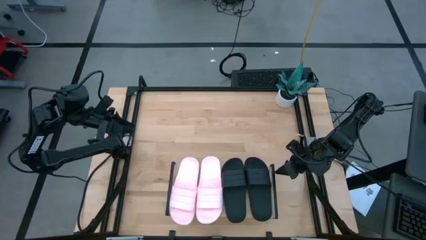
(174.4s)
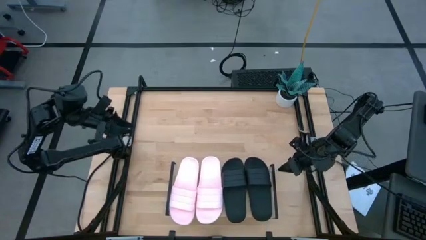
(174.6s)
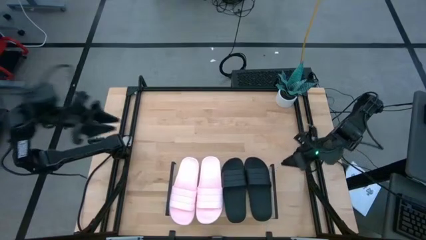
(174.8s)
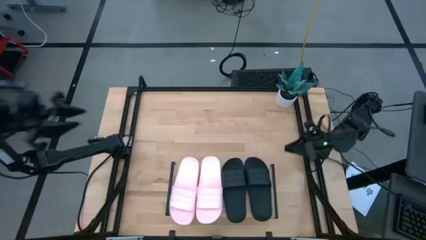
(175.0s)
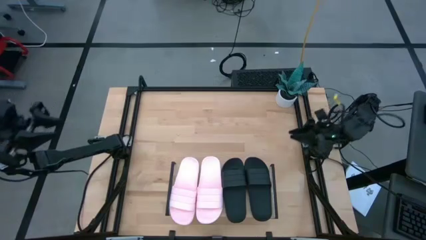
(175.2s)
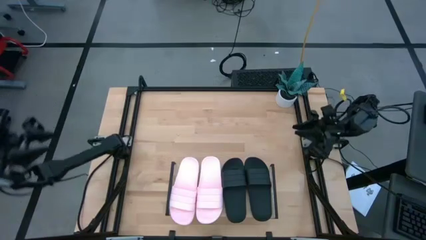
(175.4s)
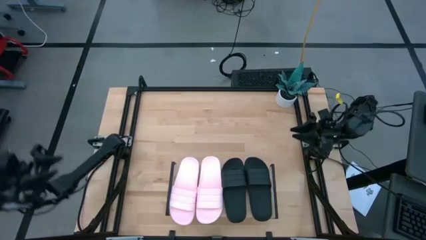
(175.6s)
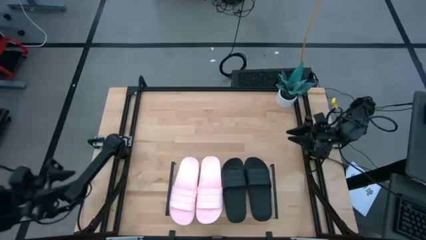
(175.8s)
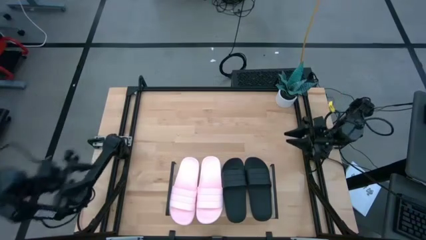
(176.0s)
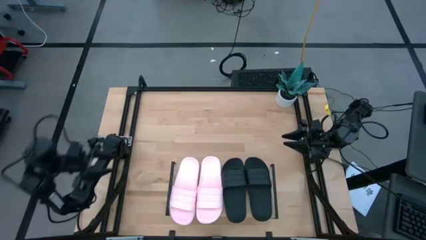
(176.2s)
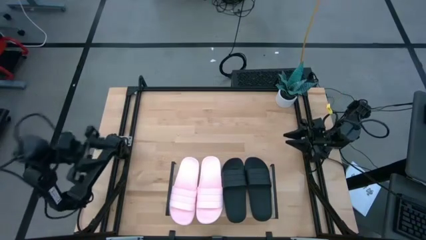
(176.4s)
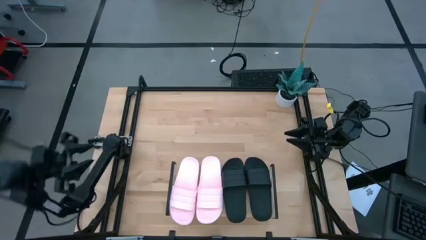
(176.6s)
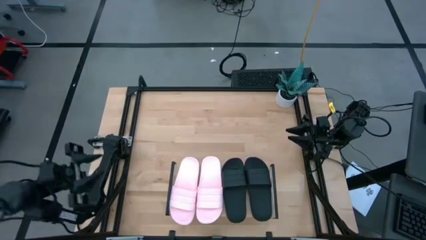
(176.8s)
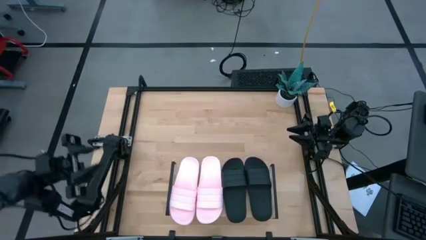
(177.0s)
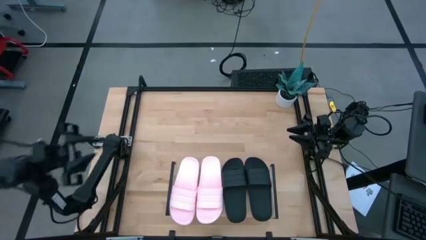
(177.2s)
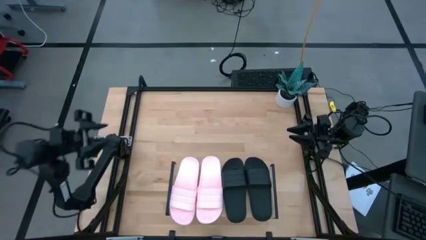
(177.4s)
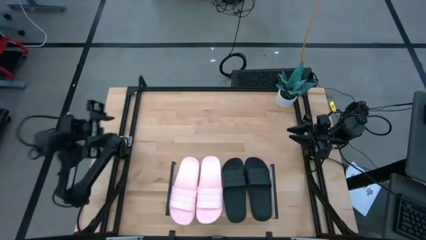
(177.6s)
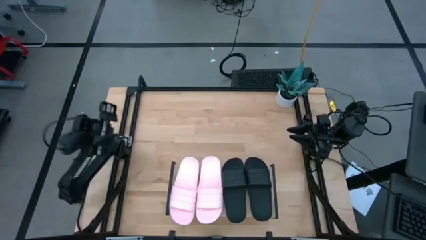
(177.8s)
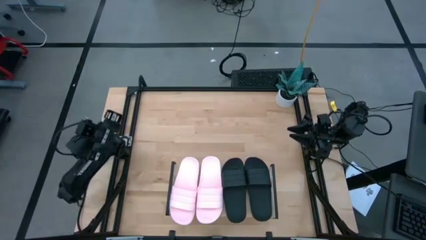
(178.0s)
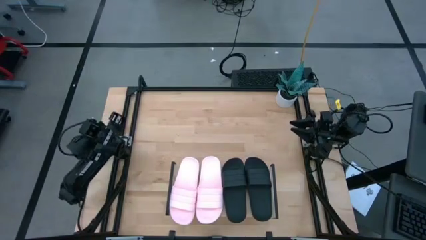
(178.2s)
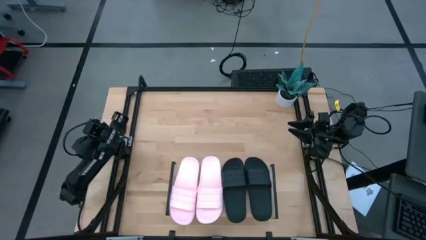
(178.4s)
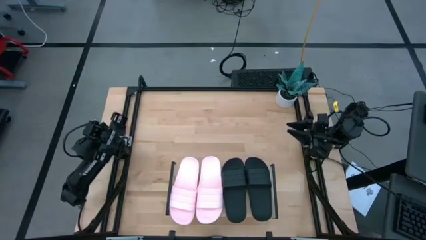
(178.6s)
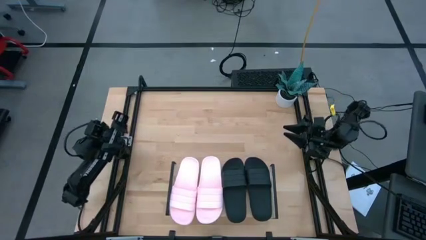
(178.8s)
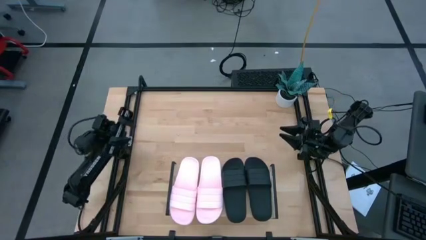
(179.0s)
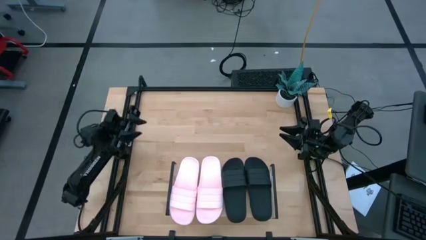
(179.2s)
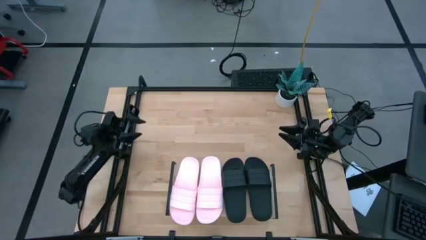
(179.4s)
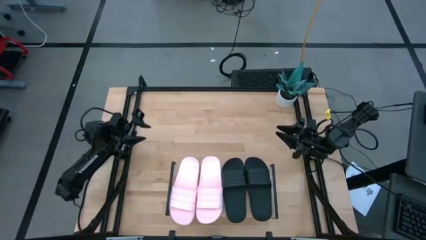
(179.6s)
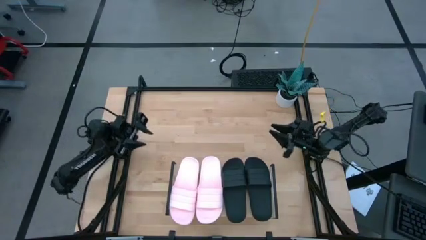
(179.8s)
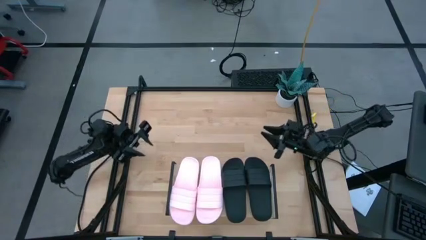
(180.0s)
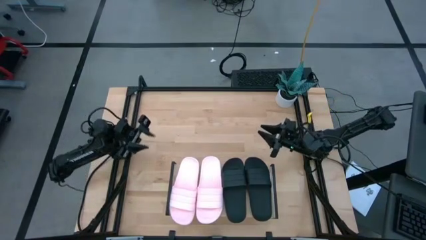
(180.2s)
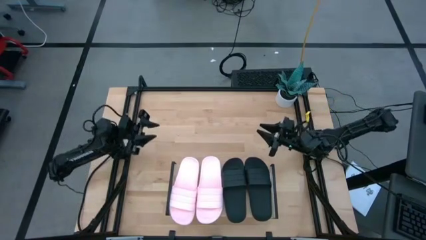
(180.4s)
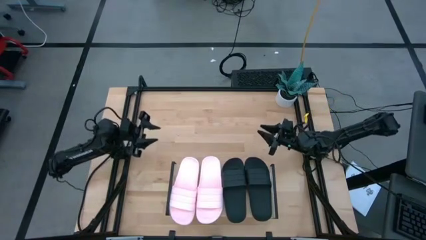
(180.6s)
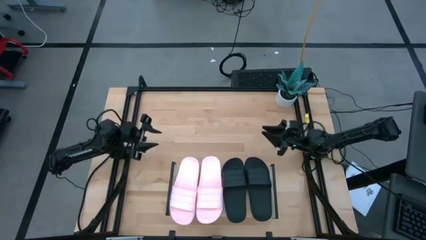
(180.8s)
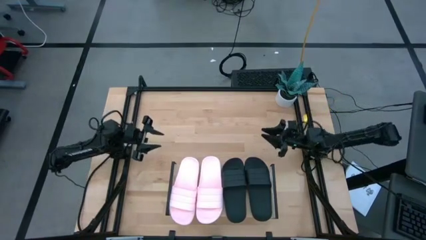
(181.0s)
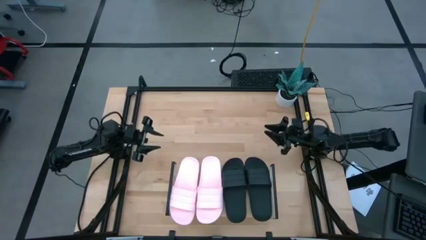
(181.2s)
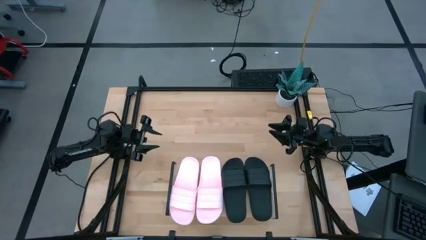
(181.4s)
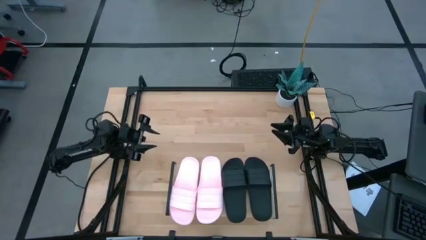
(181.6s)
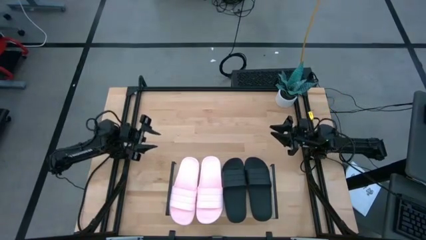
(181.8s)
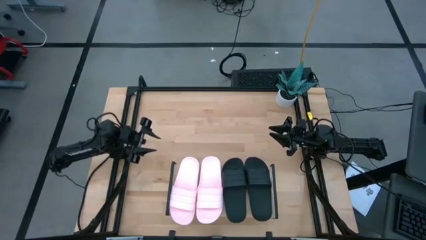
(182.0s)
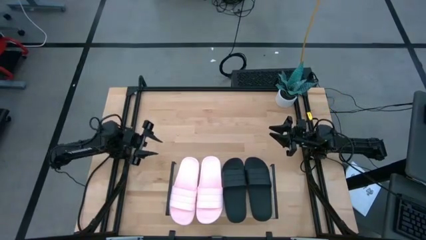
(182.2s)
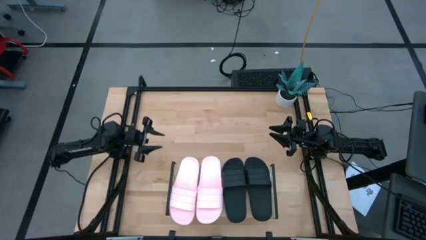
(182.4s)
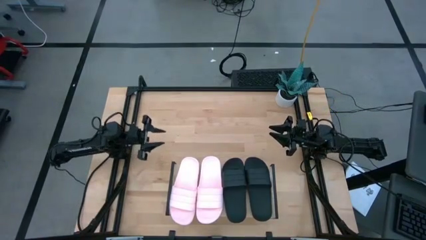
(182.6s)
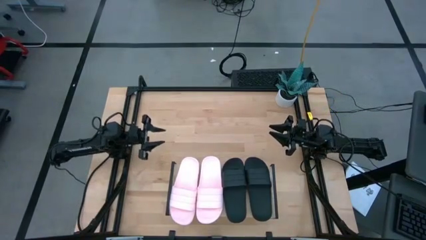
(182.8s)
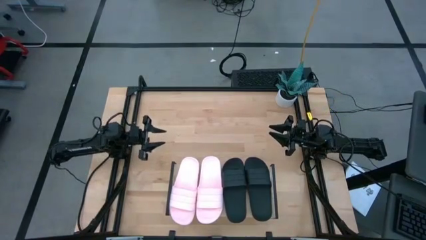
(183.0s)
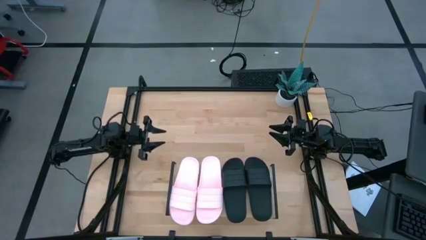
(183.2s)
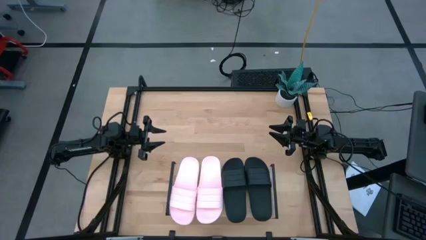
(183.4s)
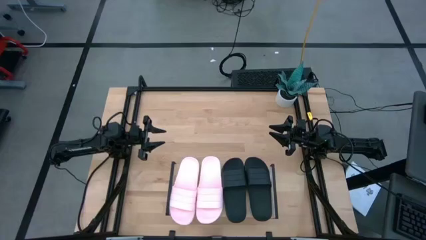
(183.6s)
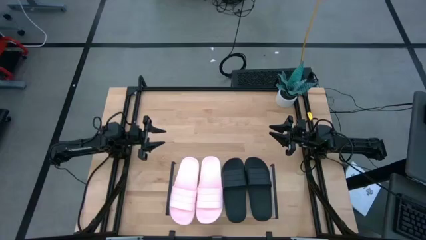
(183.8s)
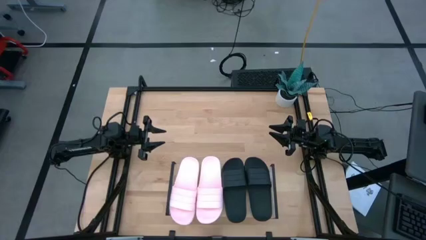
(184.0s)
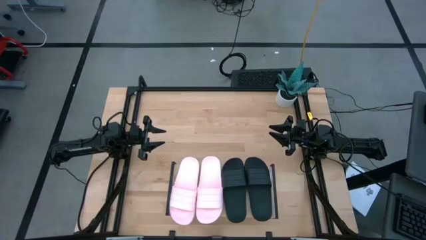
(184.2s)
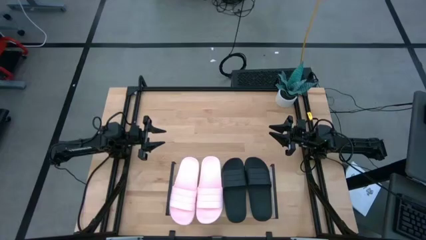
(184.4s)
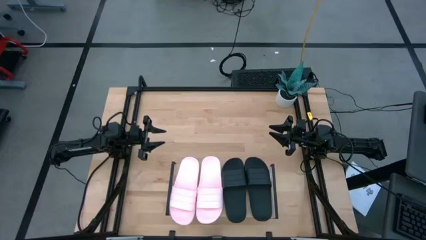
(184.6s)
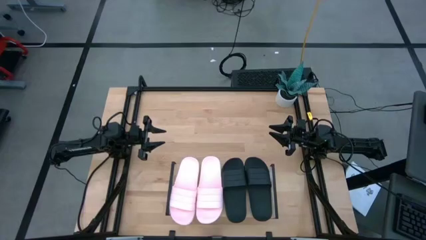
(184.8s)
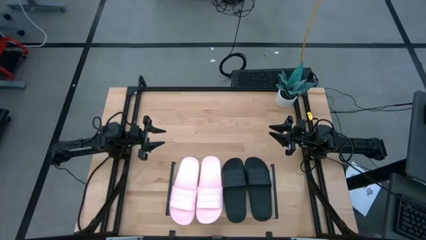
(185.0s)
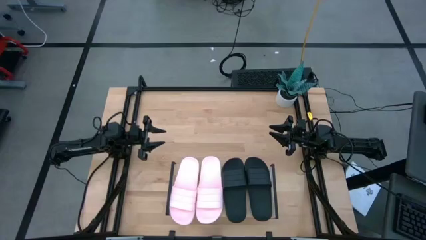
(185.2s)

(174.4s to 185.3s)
Task: Pick and place slides into the shelf
Return to Home Position
